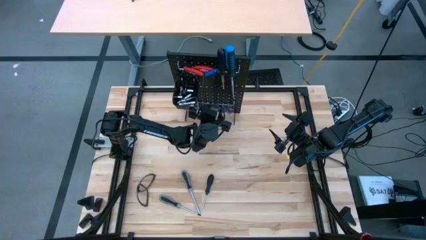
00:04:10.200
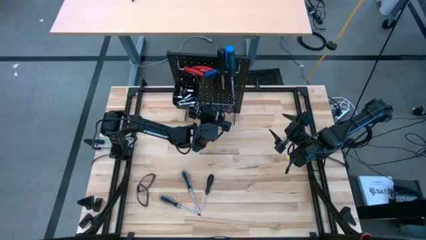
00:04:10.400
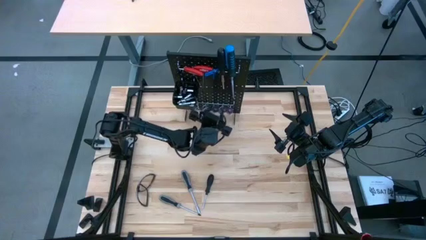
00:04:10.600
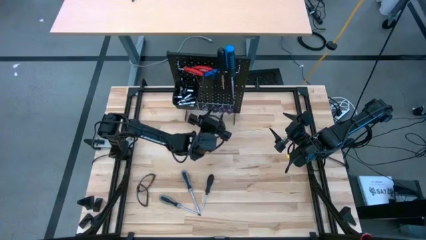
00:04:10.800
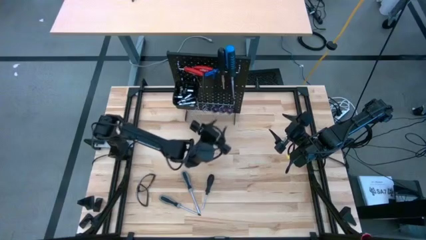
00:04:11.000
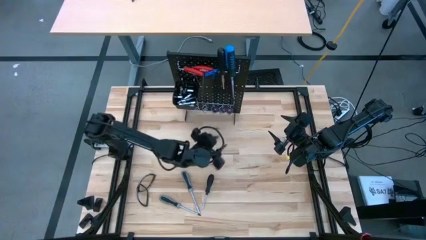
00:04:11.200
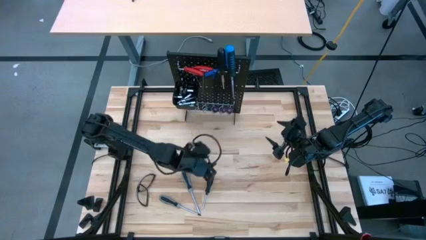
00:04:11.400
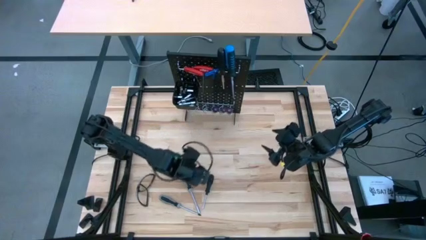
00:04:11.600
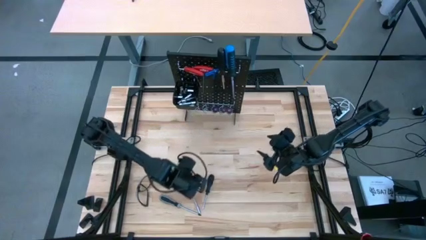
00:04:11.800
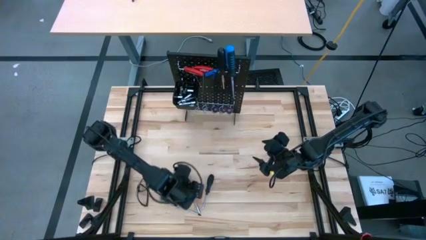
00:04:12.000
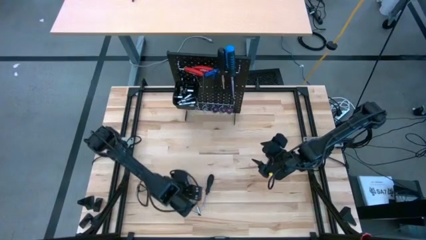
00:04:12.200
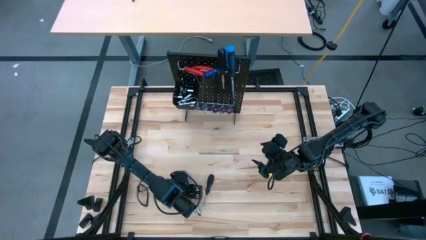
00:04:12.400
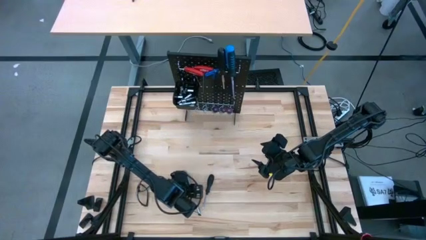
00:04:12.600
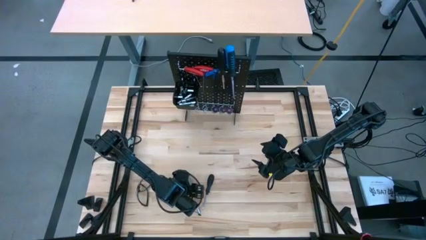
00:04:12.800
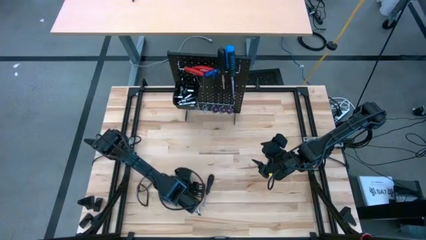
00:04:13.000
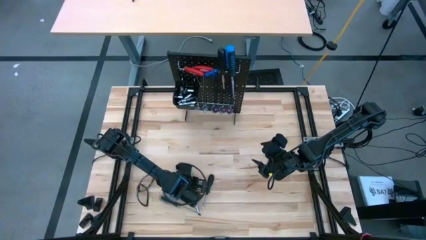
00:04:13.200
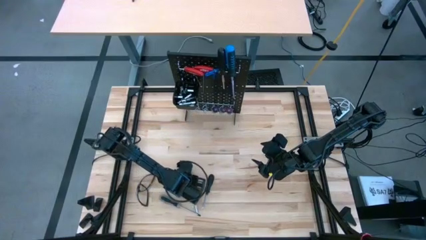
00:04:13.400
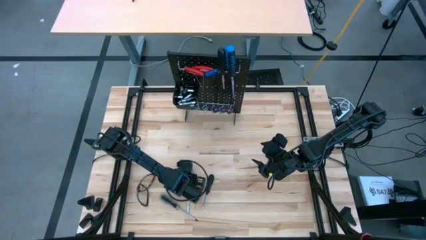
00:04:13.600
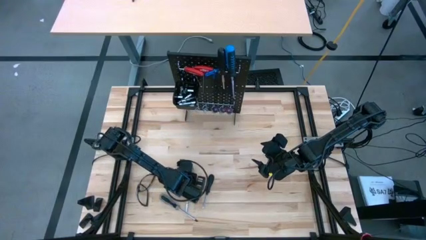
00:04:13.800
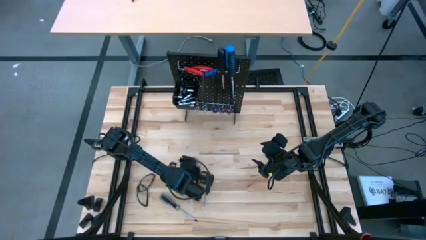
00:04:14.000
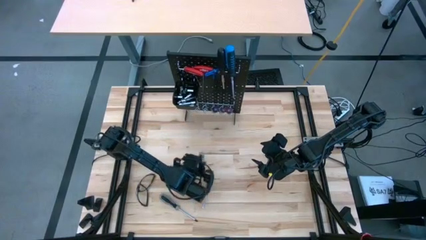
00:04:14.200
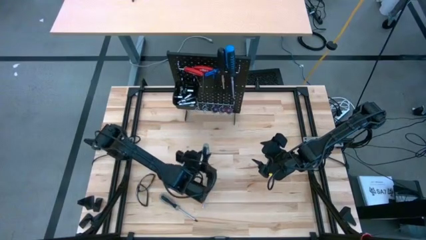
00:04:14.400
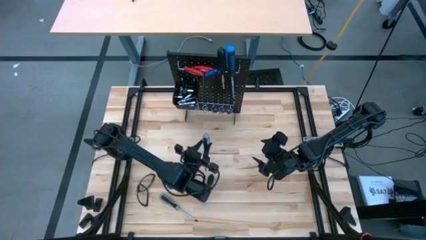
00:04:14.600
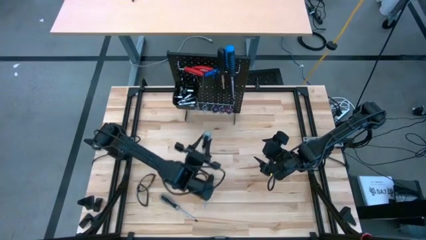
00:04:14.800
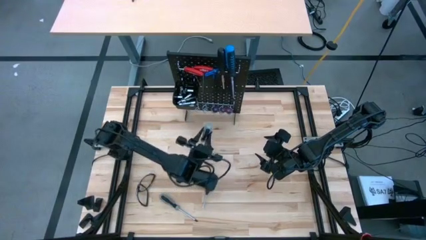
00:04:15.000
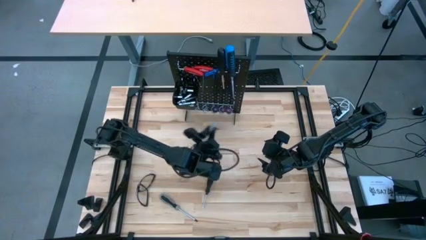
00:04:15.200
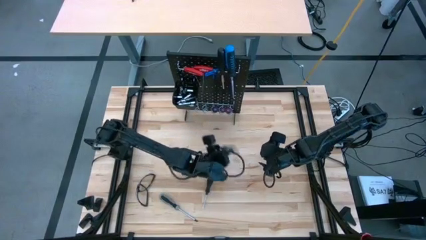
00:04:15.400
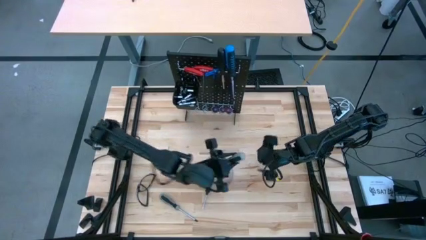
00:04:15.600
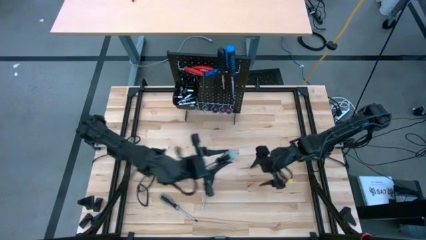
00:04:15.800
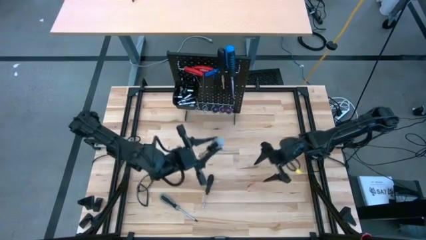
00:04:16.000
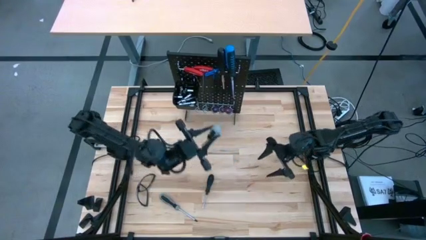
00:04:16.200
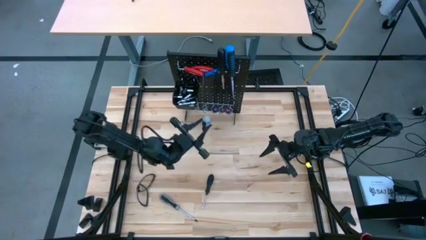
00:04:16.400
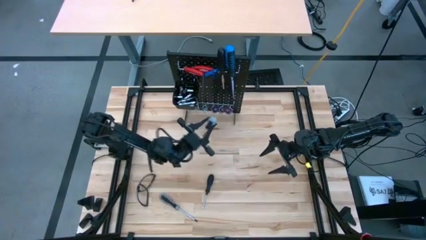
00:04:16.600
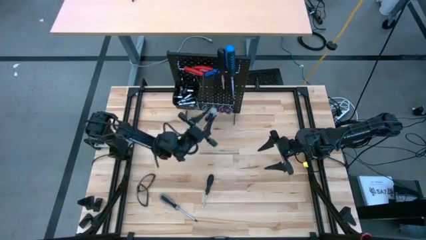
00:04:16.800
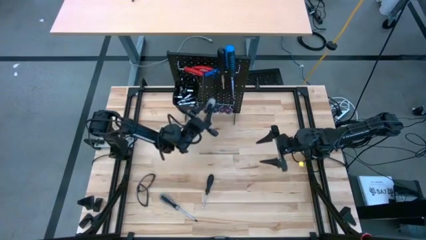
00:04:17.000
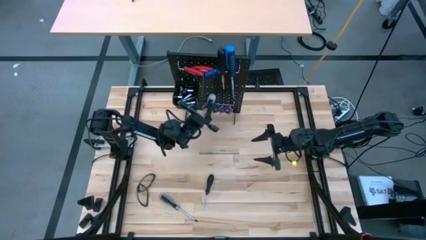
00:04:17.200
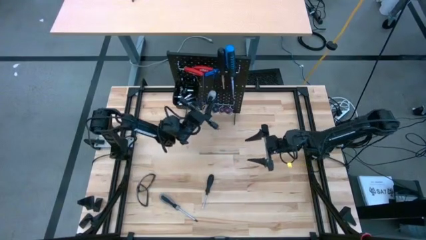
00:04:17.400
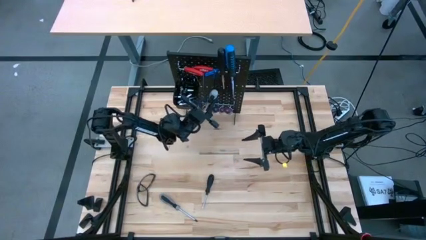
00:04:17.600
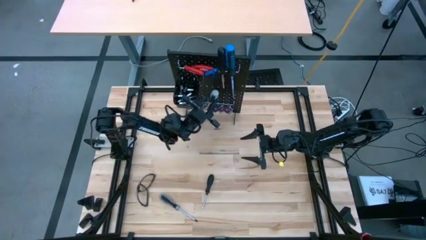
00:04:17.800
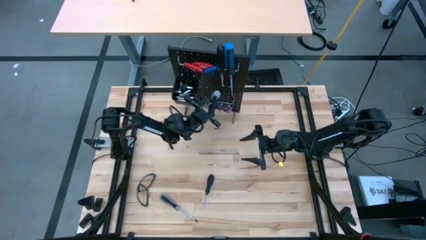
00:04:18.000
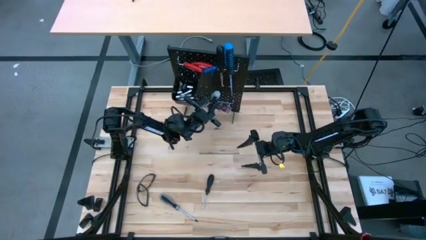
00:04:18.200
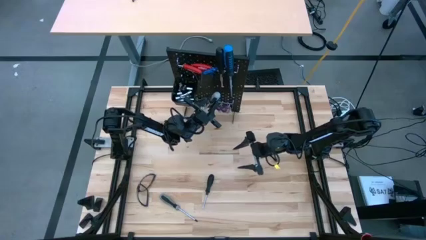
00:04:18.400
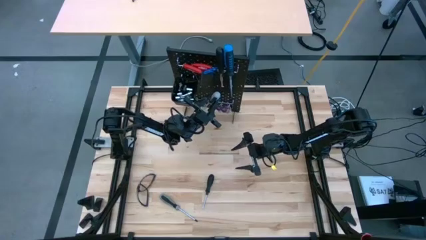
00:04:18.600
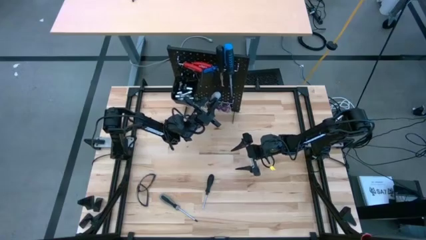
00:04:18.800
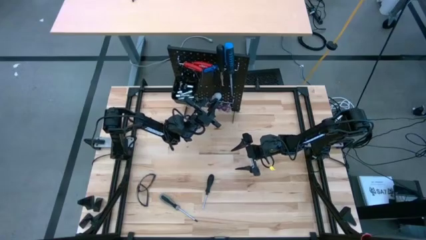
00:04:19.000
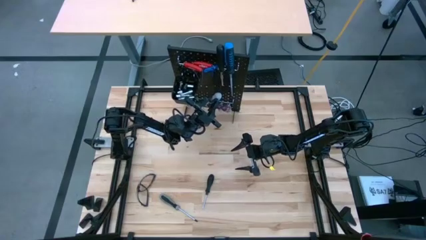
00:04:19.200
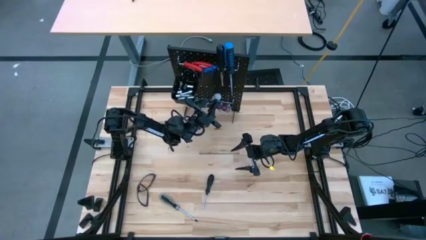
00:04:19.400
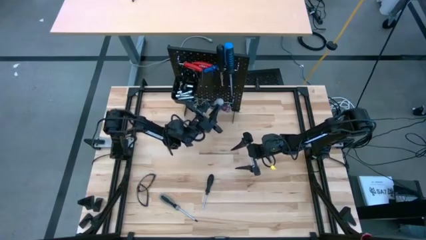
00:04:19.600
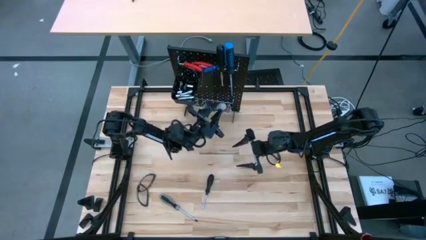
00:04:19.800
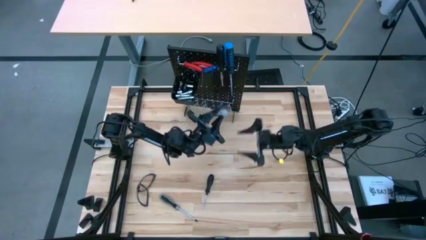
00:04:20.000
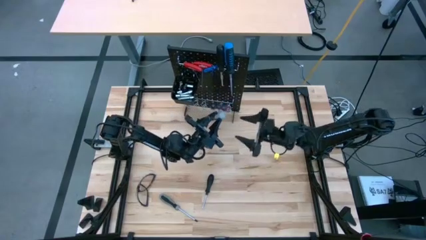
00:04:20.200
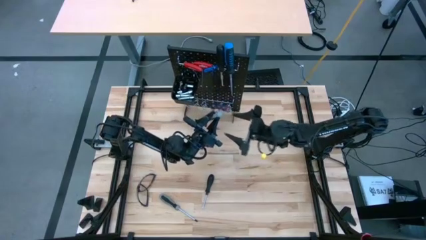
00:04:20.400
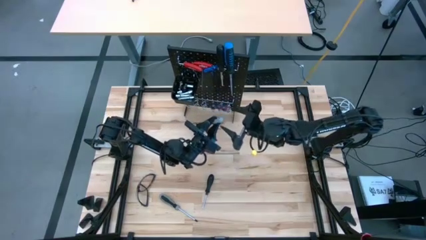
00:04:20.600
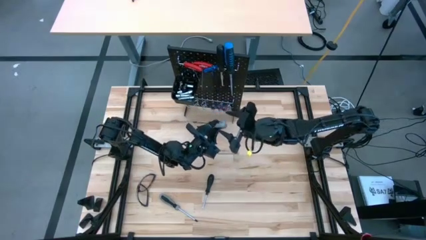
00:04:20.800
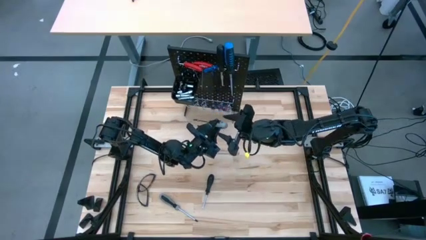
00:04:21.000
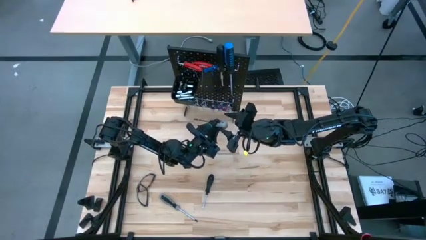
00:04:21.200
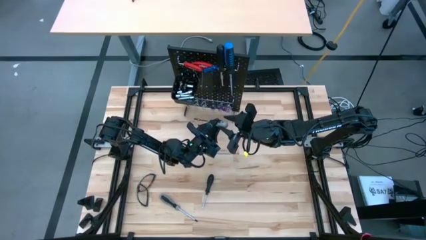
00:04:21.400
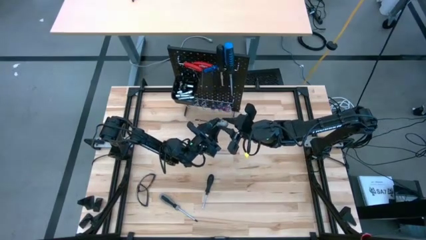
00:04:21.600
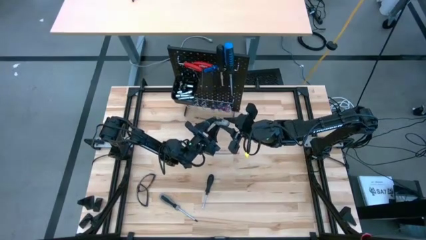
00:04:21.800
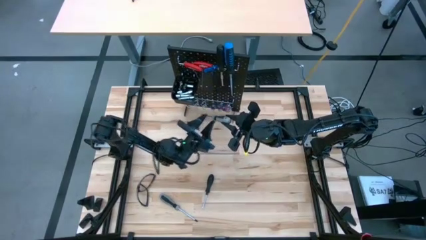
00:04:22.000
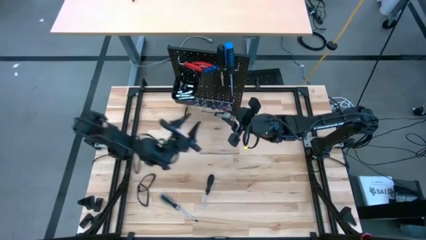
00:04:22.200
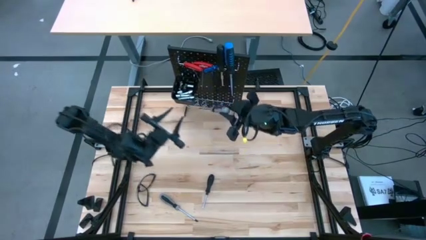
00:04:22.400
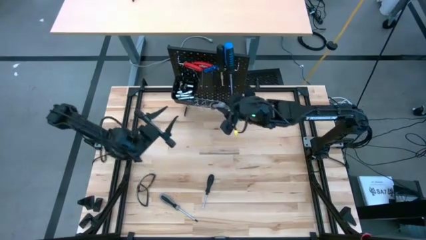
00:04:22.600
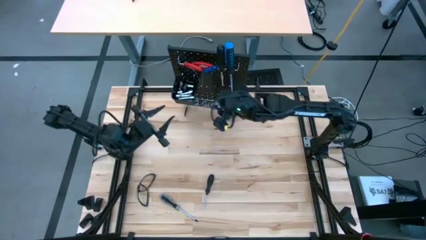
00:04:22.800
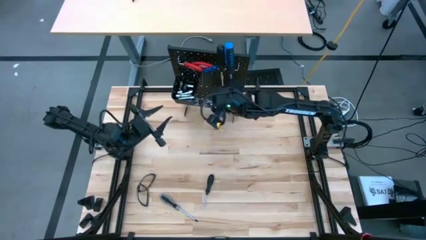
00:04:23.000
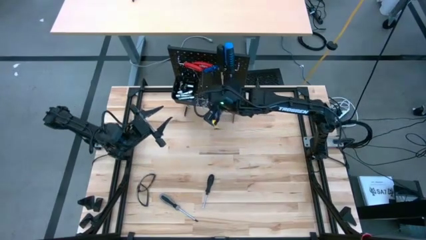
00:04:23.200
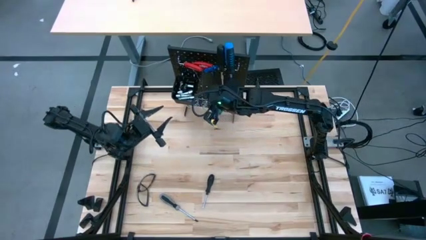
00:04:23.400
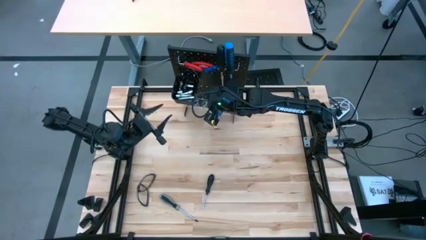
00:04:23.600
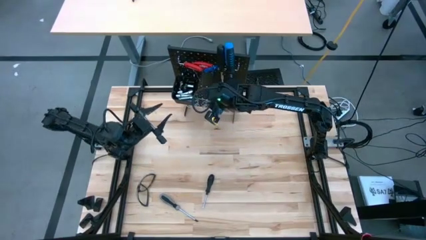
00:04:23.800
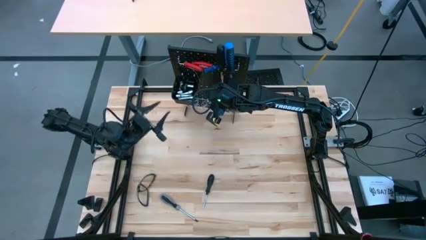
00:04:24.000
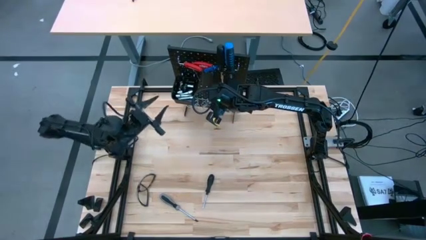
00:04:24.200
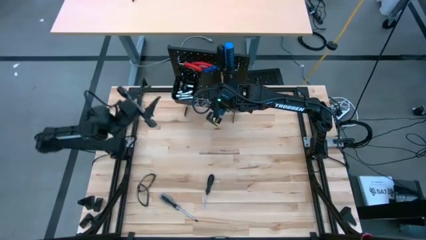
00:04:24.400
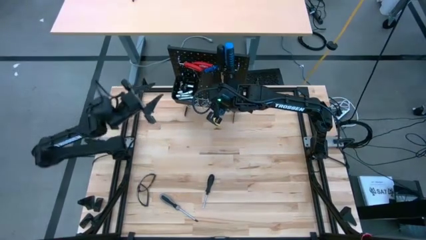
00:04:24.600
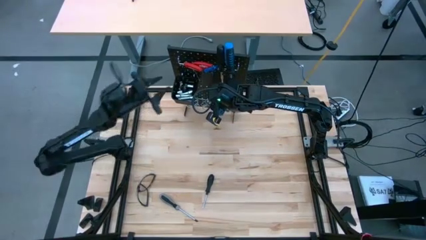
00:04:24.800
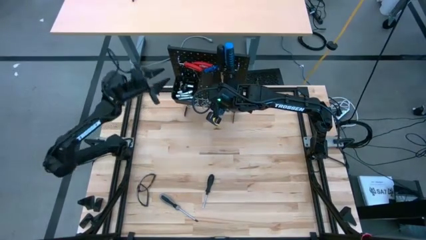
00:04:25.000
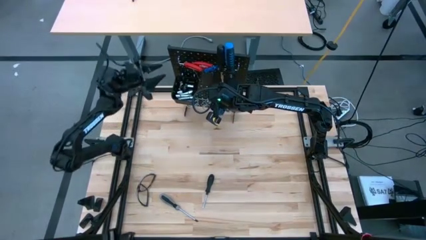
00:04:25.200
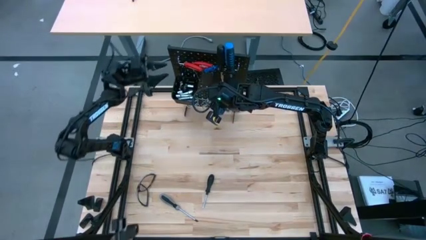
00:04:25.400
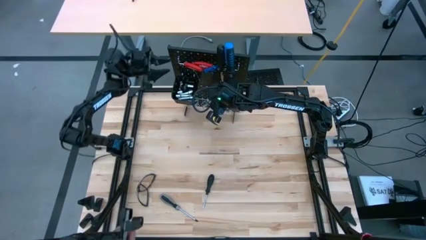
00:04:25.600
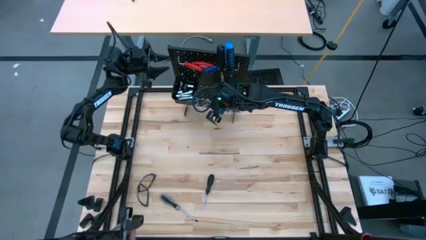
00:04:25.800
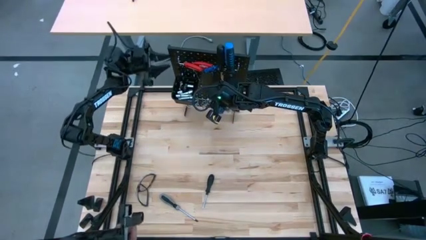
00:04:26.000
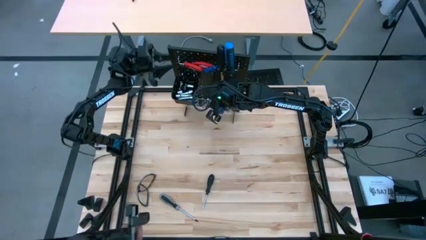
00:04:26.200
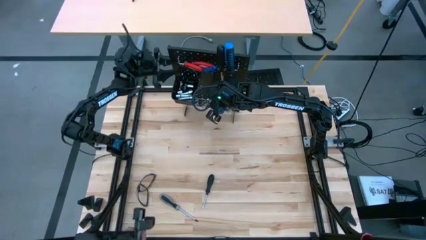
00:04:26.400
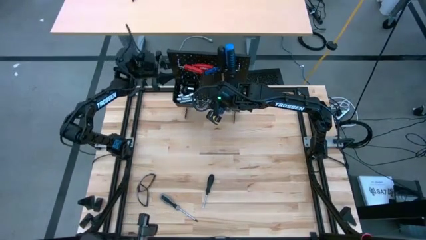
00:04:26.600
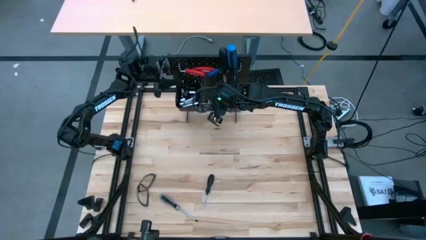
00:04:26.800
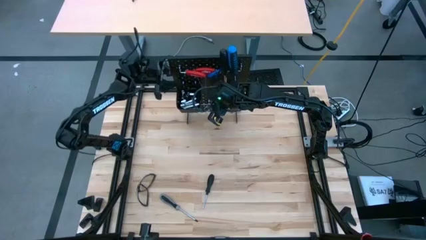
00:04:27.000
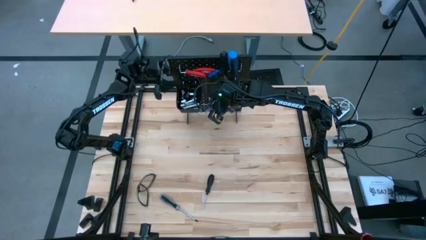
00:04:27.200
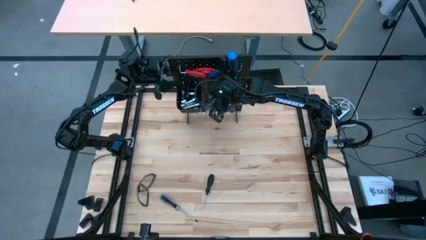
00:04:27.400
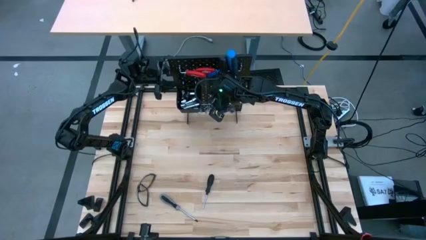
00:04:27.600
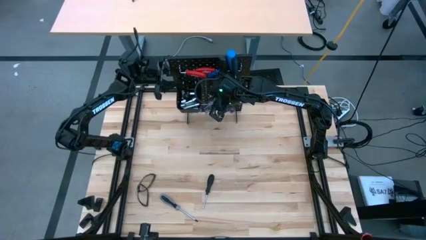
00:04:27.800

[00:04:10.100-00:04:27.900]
Task: Hang tools onto peg board
Hang the gray screwdriver on the pegboard
